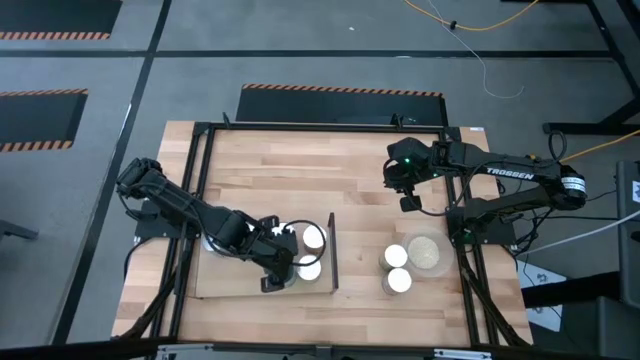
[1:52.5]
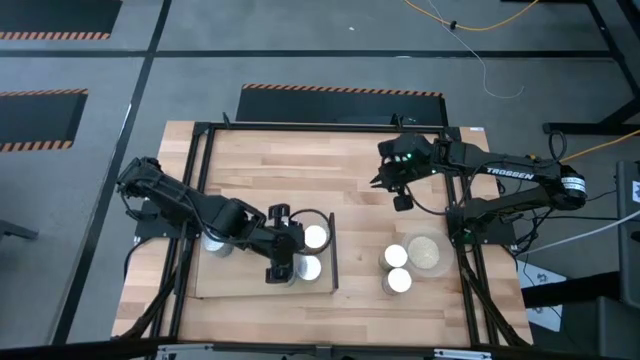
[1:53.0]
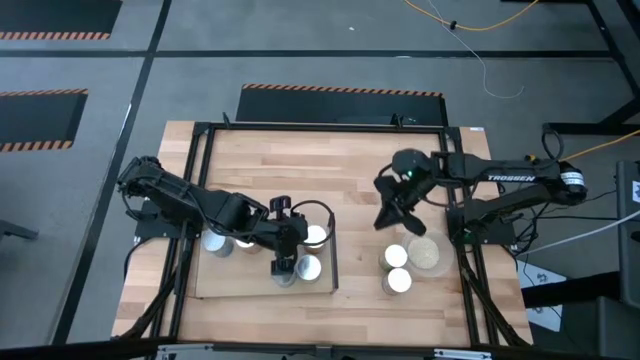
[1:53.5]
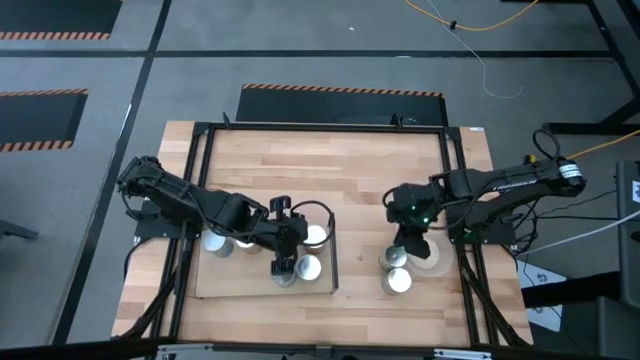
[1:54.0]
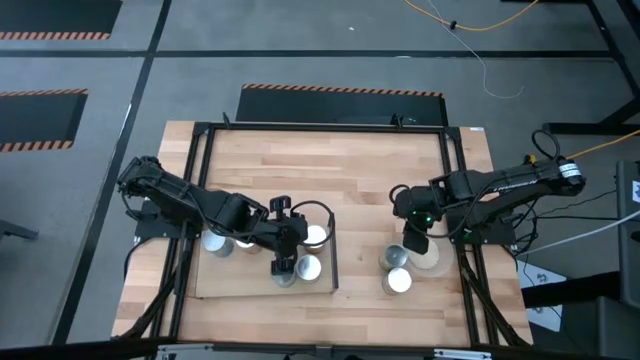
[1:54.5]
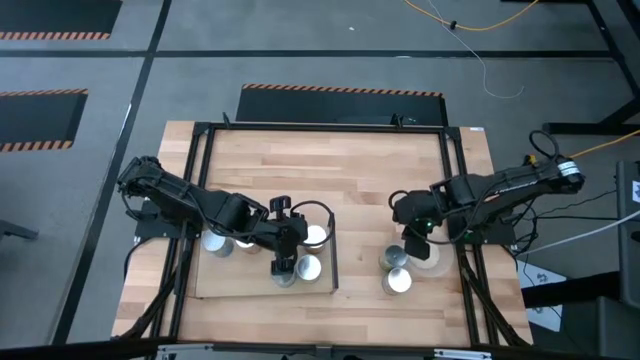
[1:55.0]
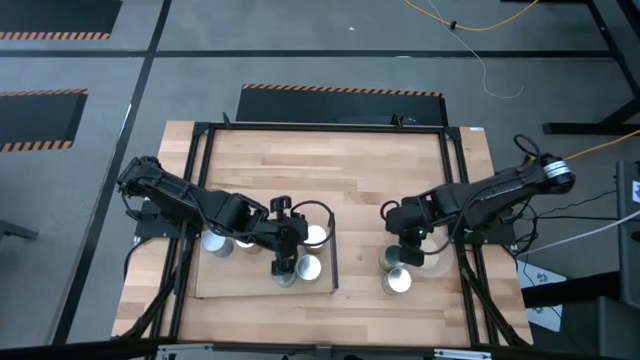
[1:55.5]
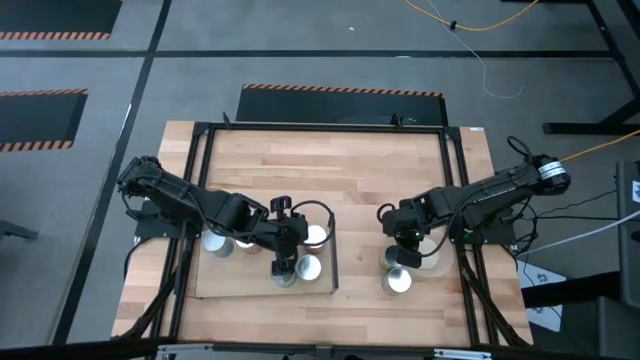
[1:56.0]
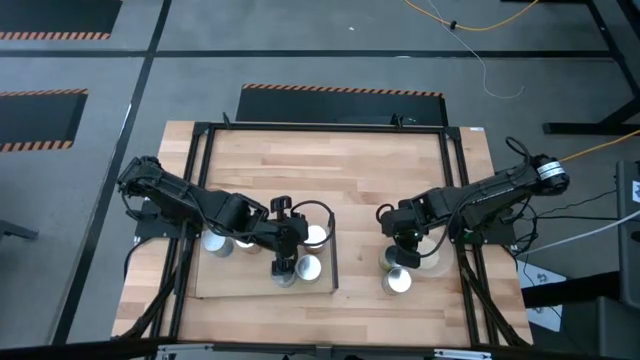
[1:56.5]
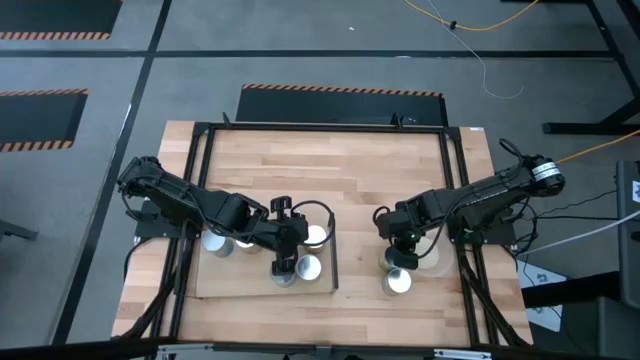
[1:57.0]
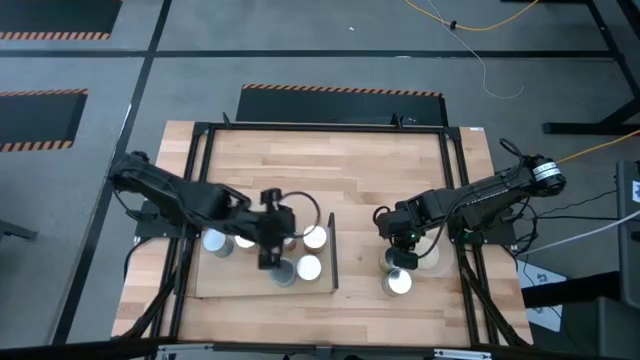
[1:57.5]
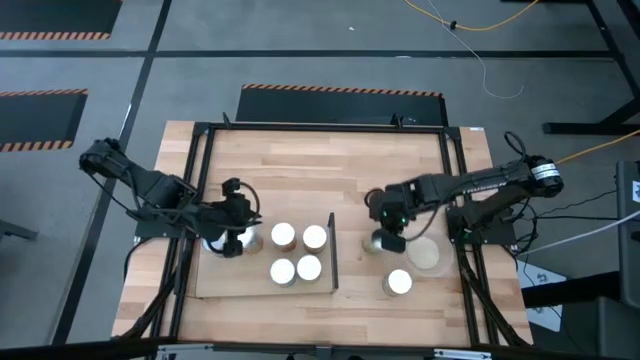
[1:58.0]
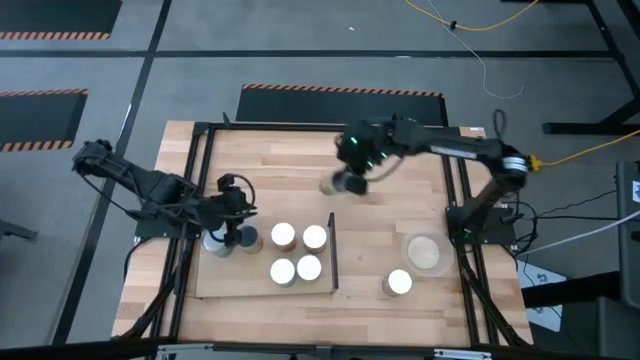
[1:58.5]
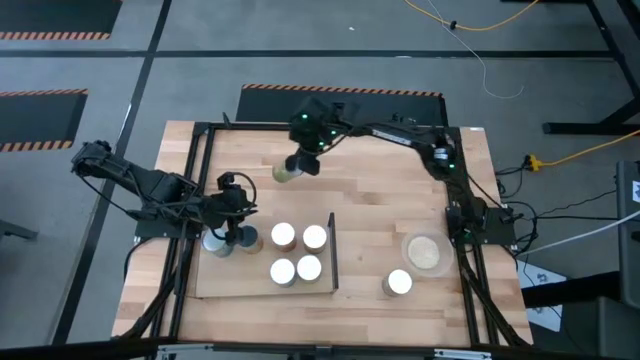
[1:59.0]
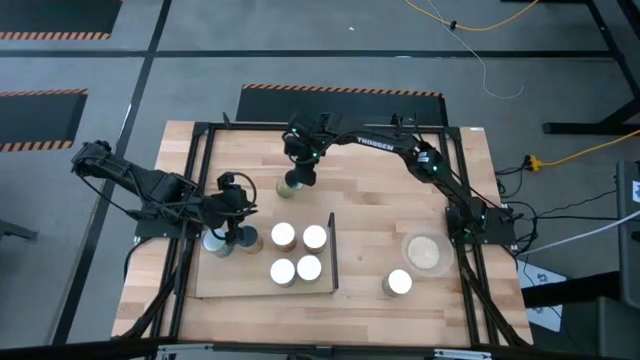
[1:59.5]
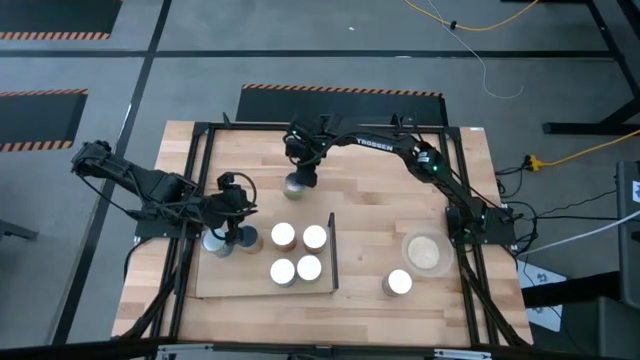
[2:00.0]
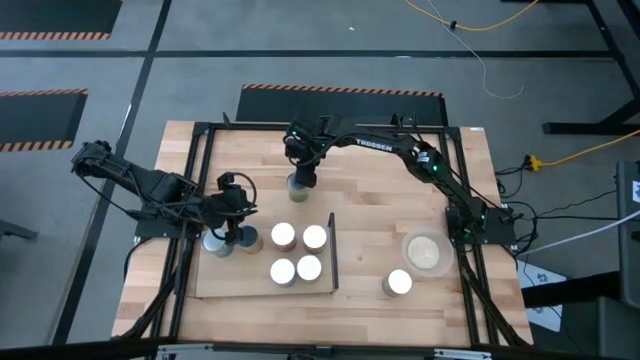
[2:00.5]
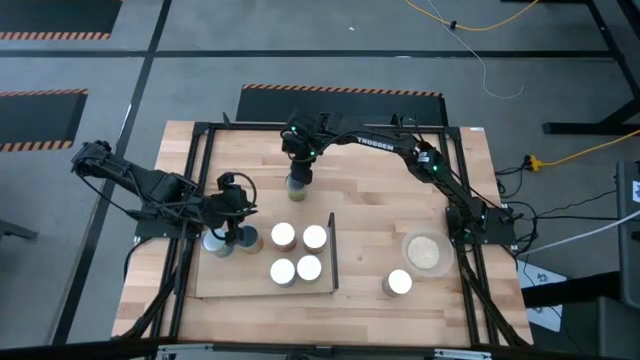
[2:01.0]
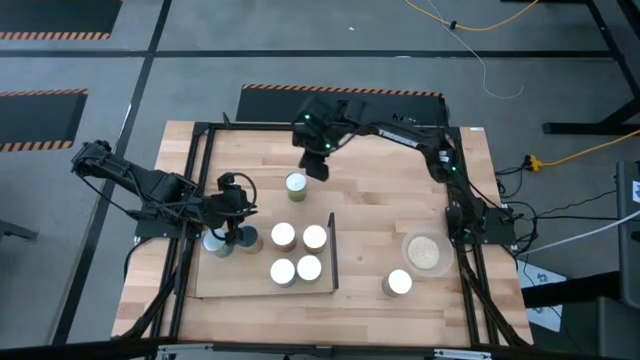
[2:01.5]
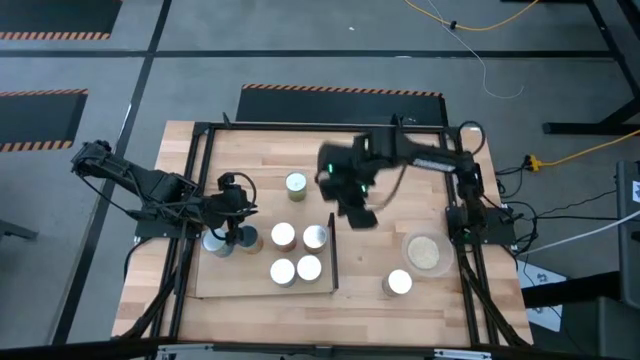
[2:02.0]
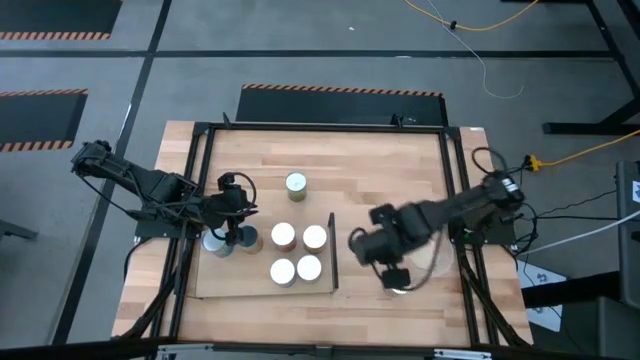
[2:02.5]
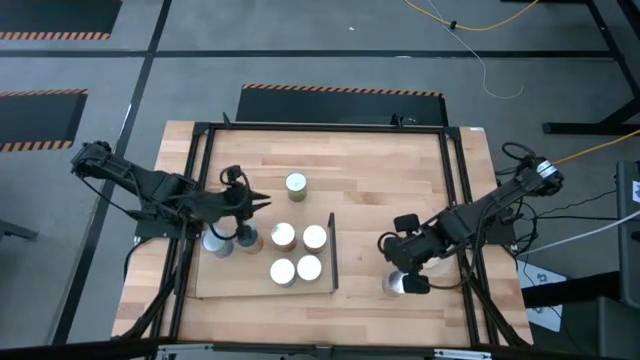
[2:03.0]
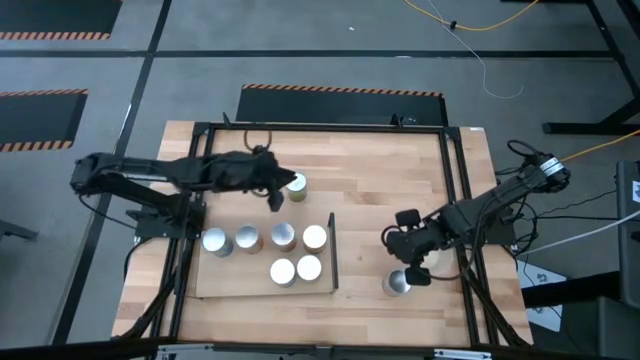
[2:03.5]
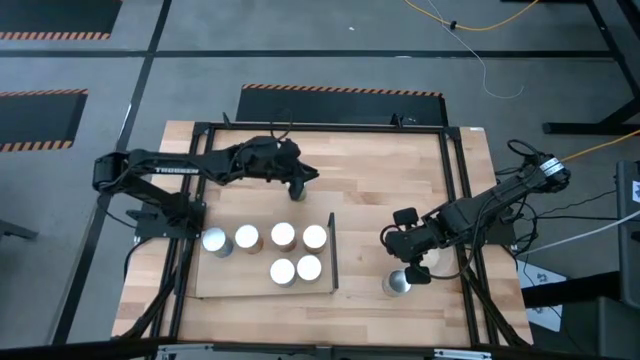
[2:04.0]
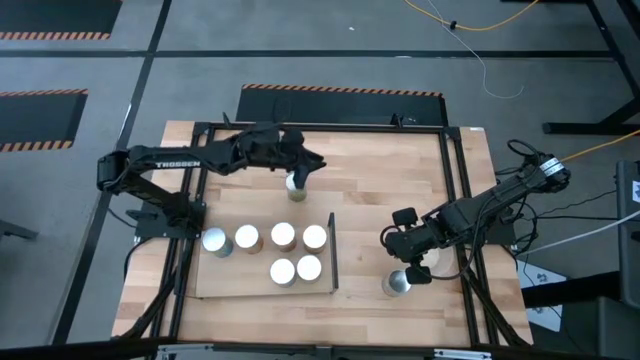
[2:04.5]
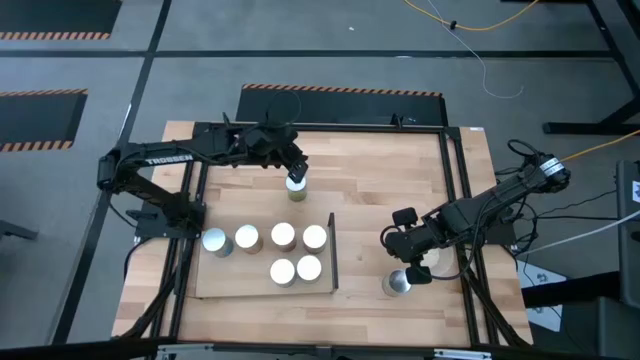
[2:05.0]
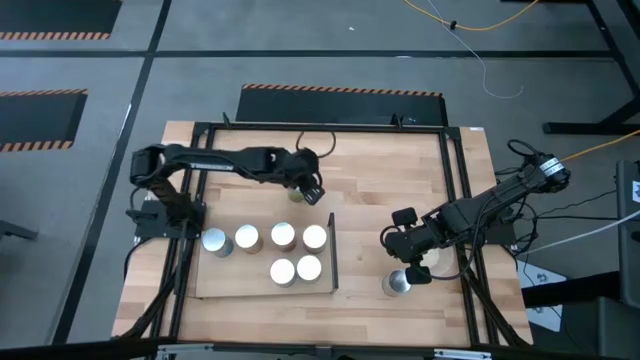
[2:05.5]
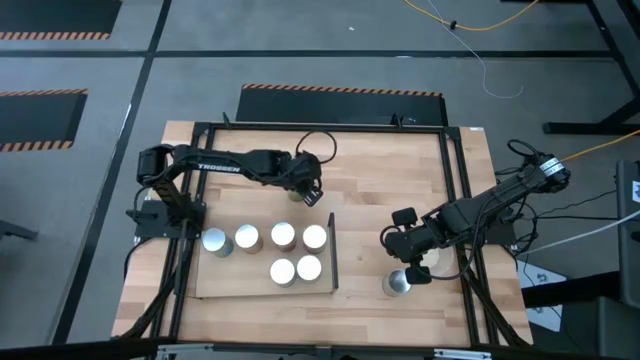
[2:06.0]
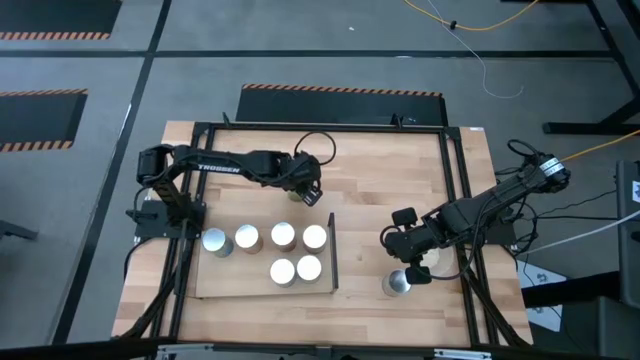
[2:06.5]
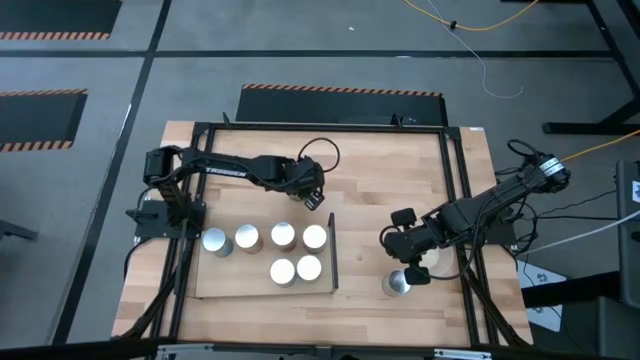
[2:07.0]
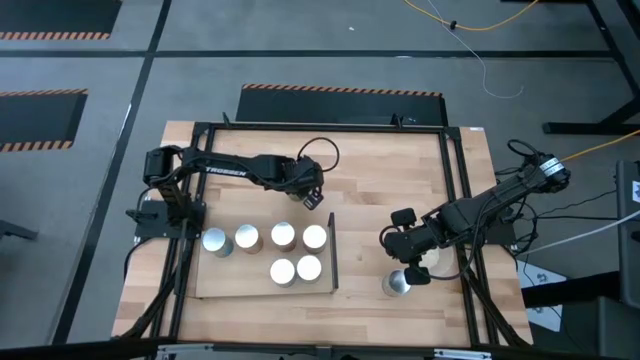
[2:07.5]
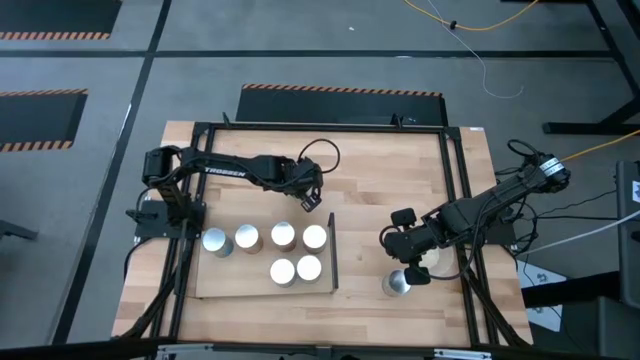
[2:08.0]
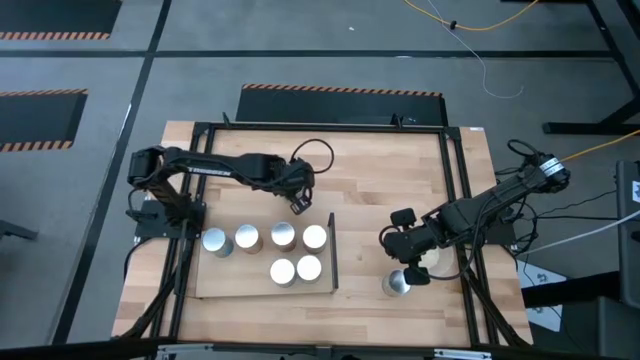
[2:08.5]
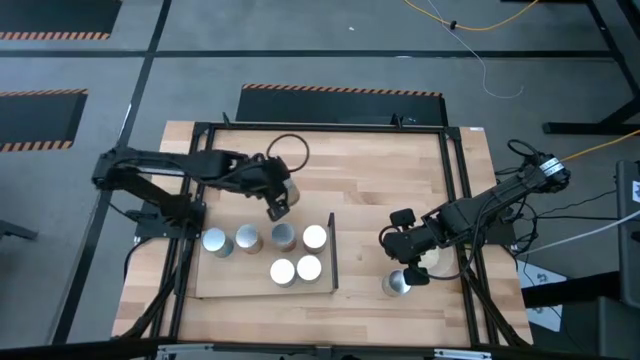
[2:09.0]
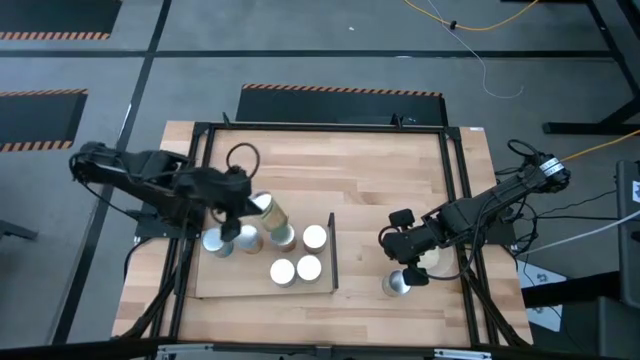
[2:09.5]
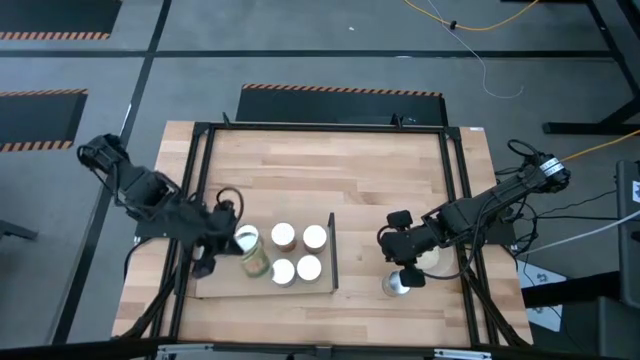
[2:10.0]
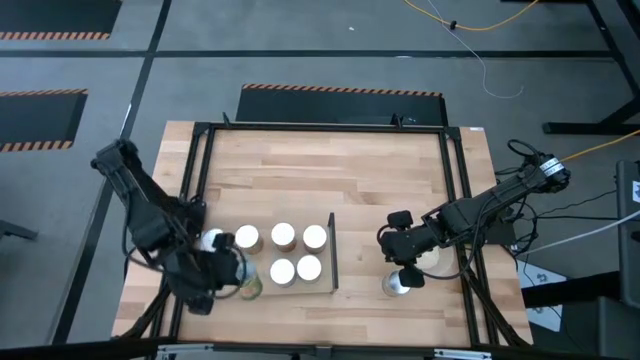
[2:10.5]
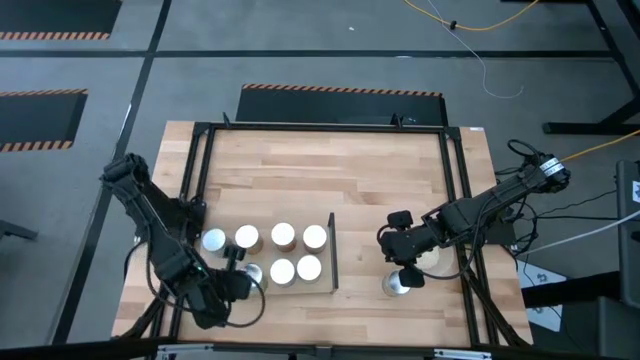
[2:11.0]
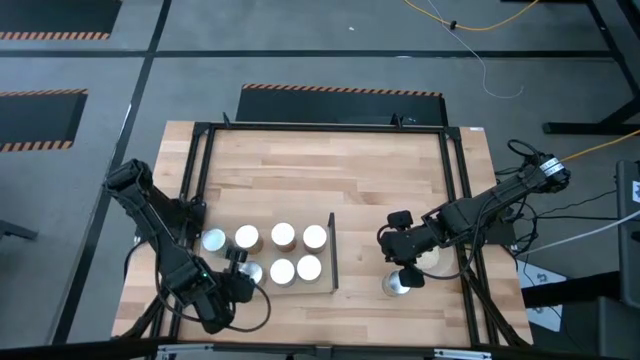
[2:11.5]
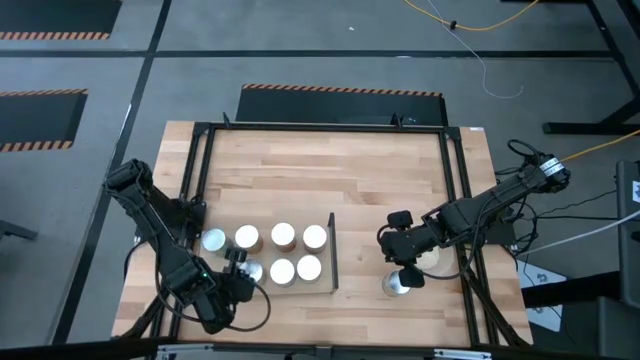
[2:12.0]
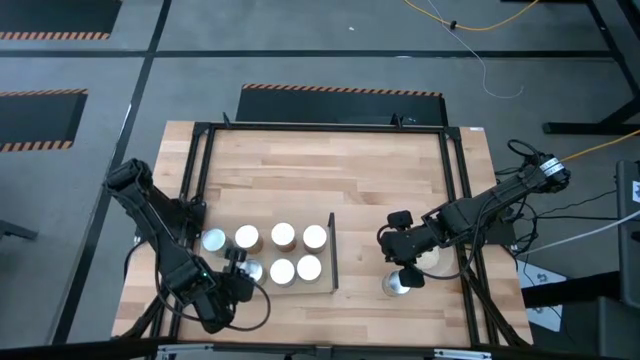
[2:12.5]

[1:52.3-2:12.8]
Task: Pick and place cans onto a shelf
Put the orange can on the shelf

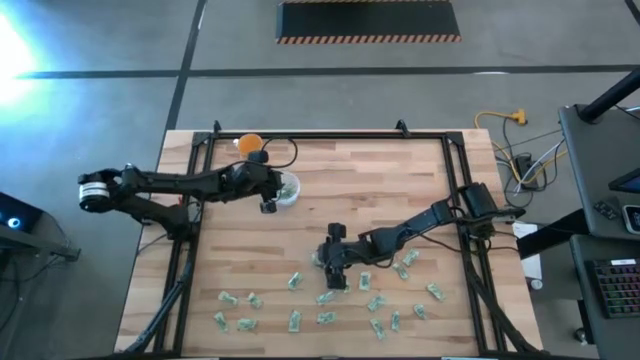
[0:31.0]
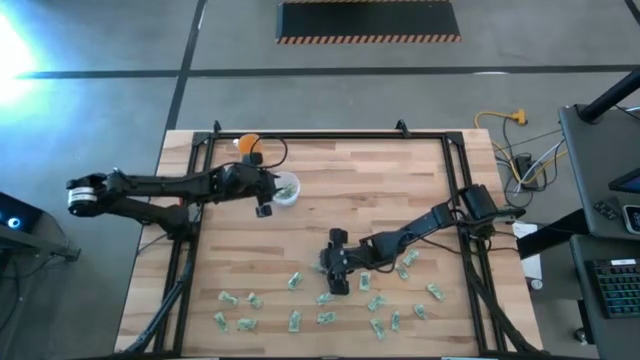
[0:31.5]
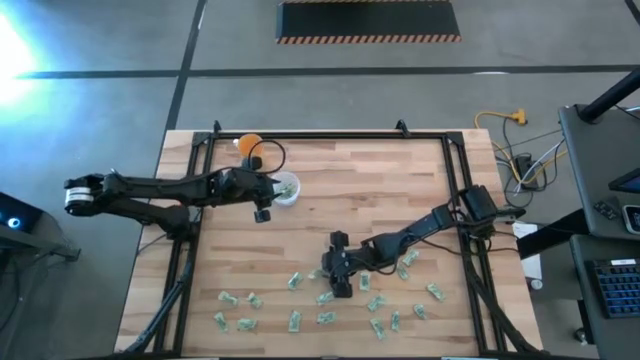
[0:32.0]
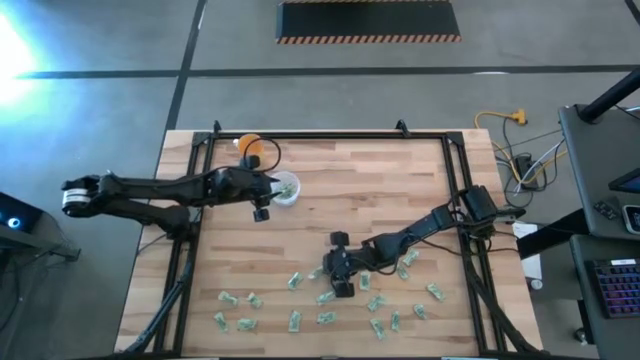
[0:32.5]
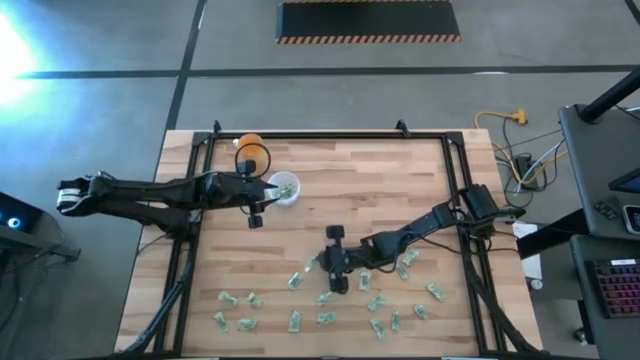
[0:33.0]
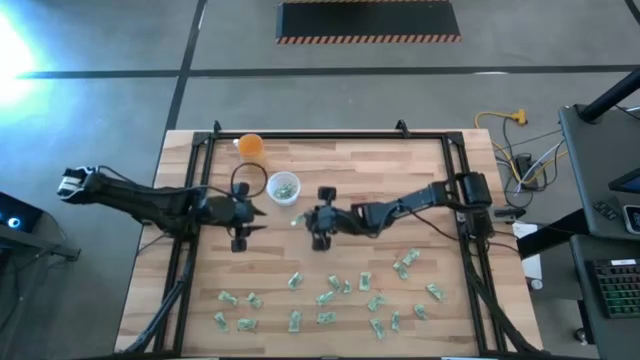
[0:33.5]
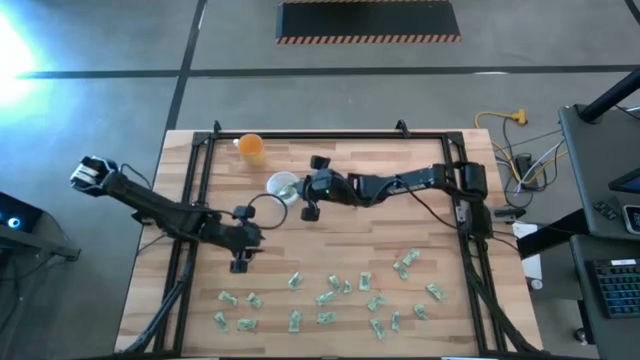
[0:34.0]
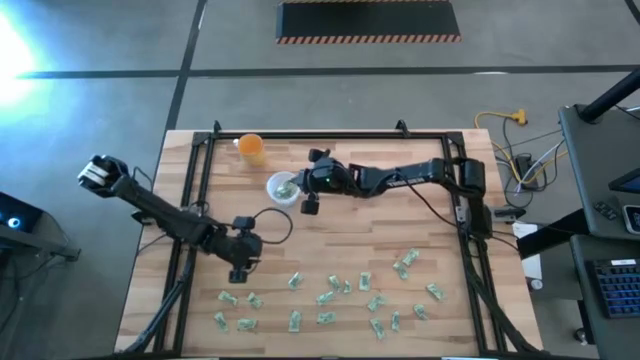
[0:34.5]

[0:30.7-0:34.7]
Task: Pick and place Stevia / Truvia into bins
Put the stevia packet into the transparent container
